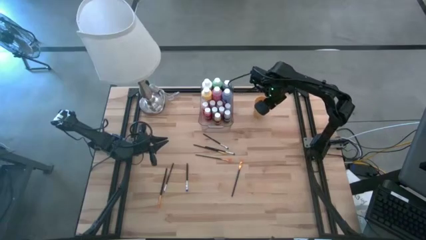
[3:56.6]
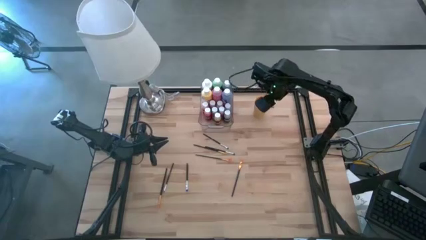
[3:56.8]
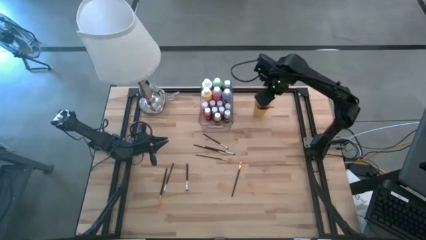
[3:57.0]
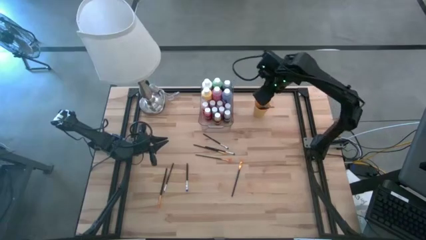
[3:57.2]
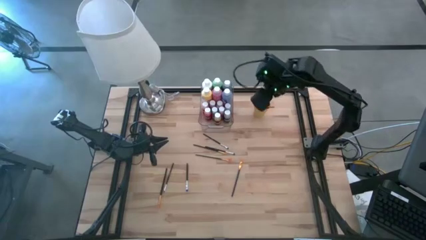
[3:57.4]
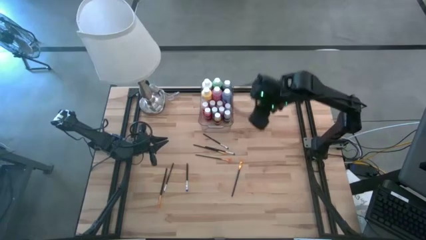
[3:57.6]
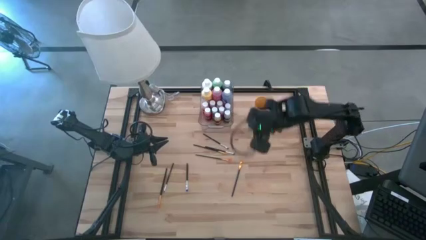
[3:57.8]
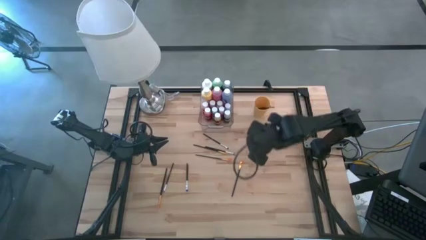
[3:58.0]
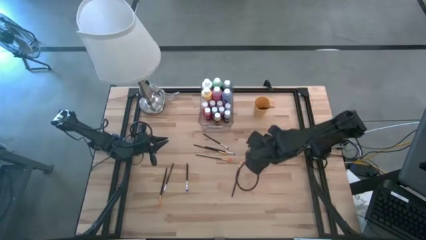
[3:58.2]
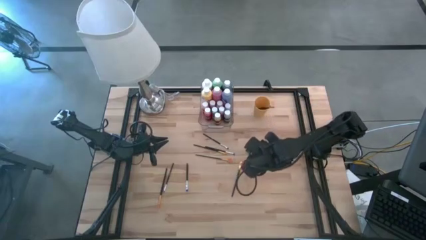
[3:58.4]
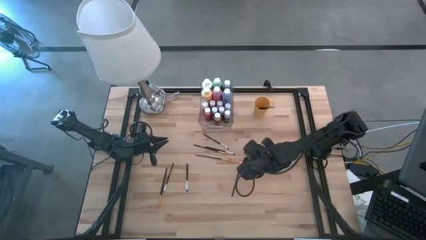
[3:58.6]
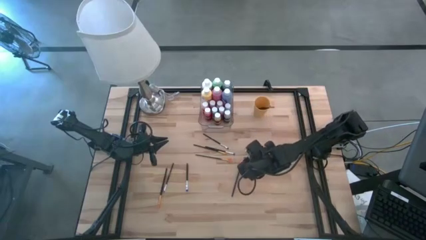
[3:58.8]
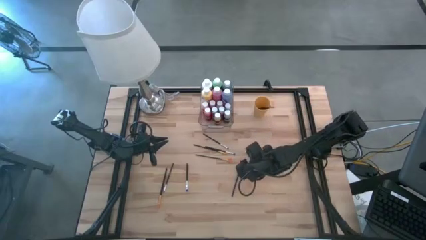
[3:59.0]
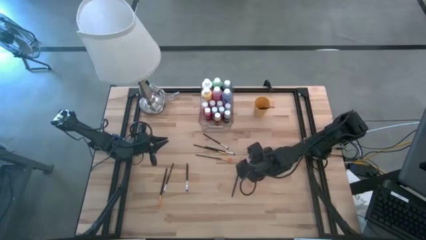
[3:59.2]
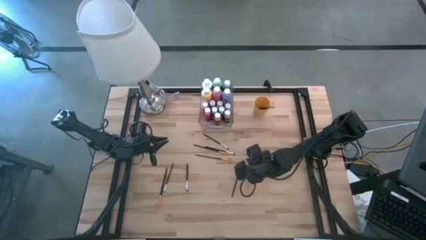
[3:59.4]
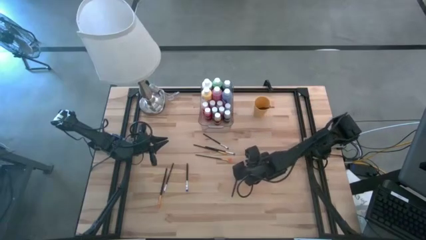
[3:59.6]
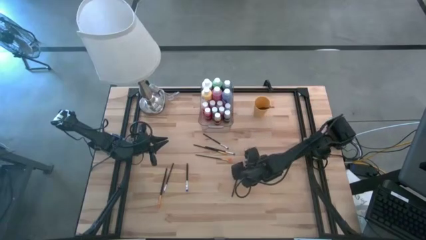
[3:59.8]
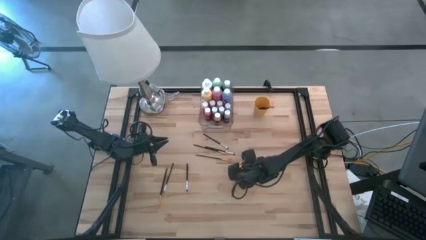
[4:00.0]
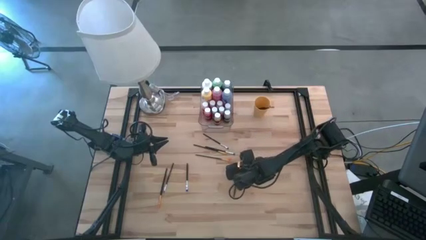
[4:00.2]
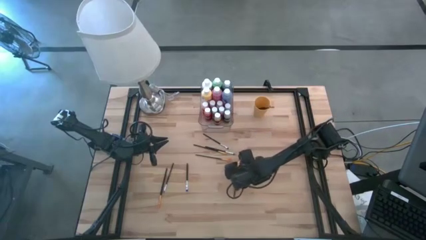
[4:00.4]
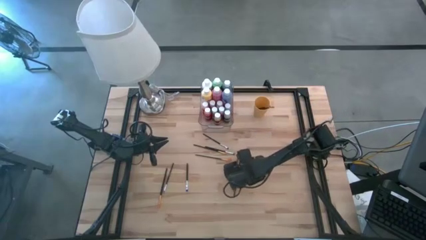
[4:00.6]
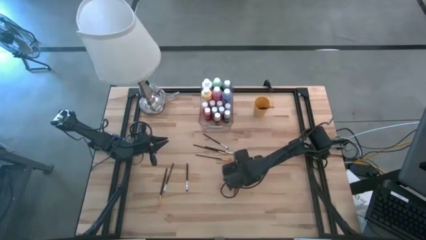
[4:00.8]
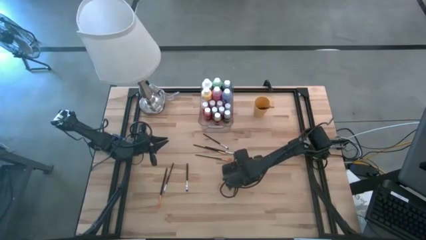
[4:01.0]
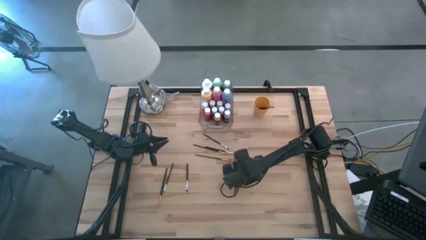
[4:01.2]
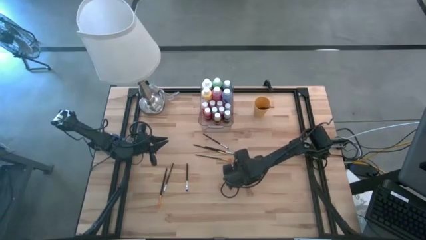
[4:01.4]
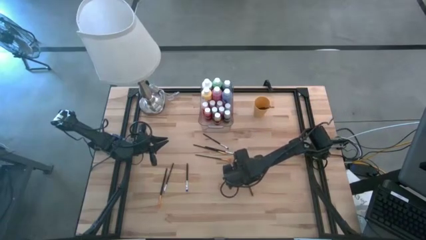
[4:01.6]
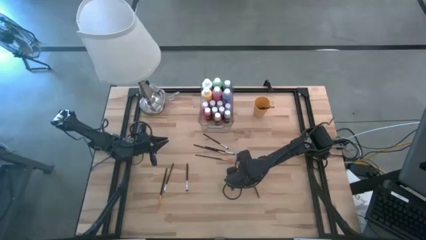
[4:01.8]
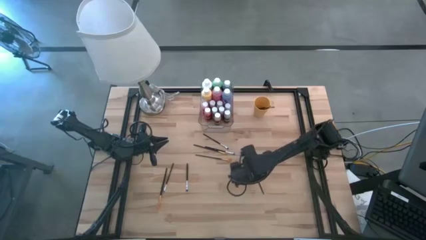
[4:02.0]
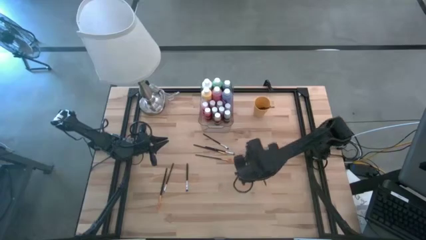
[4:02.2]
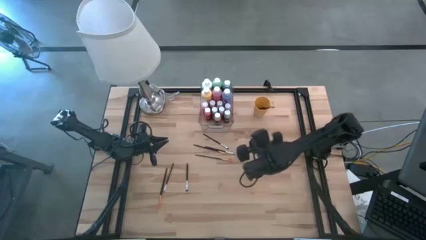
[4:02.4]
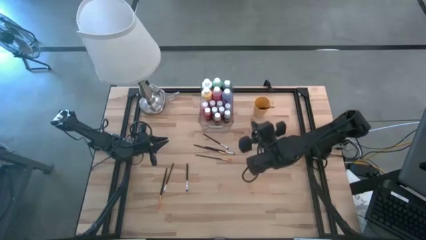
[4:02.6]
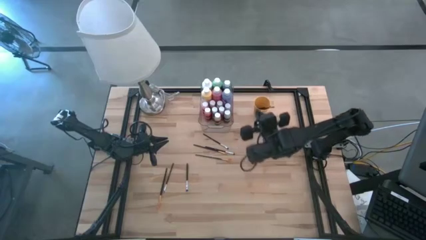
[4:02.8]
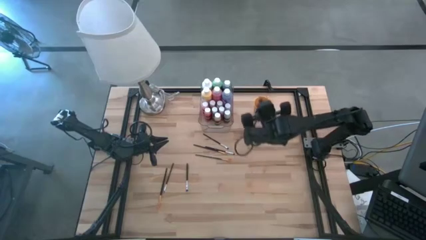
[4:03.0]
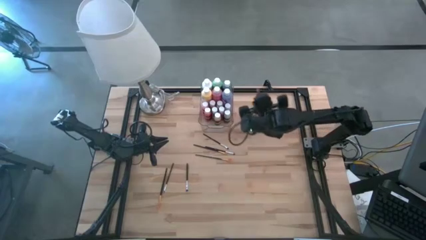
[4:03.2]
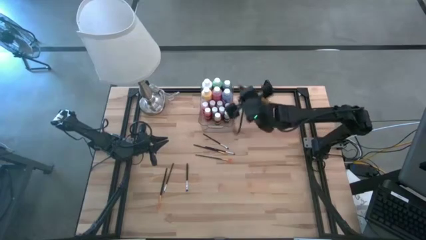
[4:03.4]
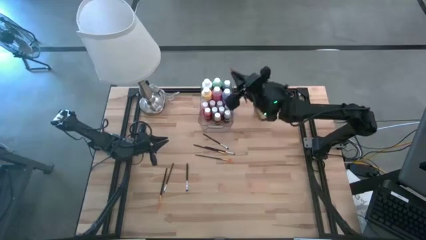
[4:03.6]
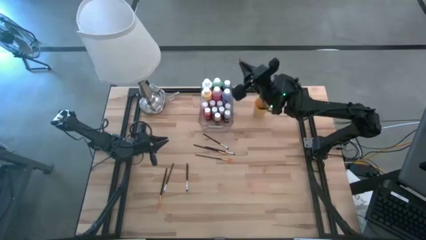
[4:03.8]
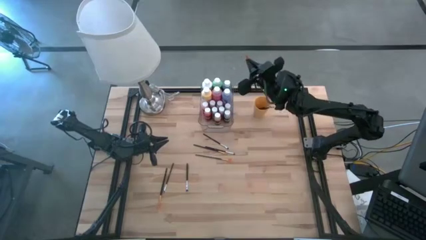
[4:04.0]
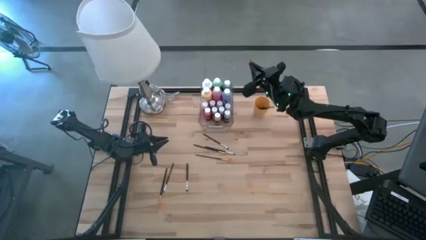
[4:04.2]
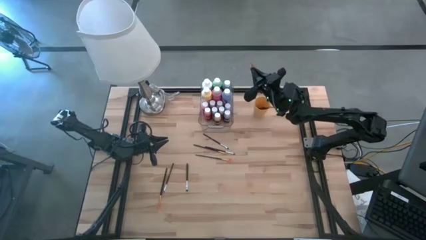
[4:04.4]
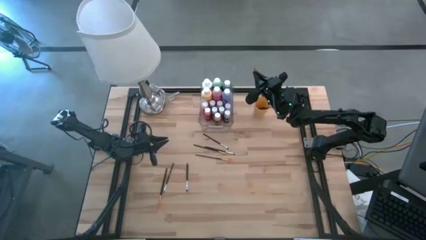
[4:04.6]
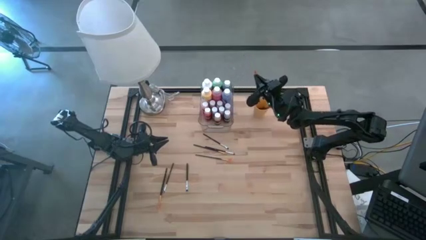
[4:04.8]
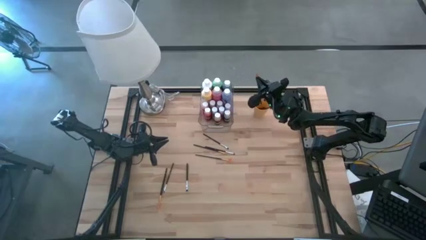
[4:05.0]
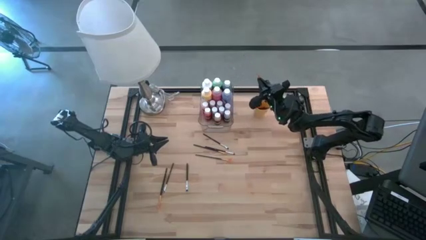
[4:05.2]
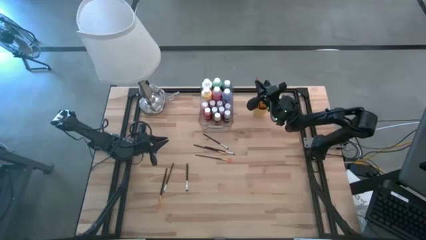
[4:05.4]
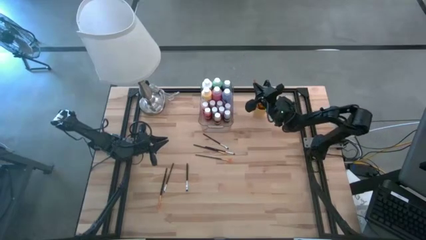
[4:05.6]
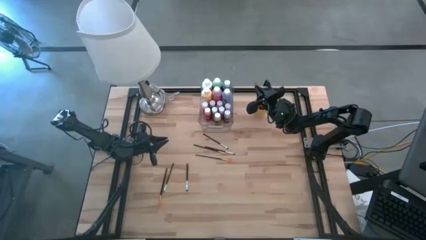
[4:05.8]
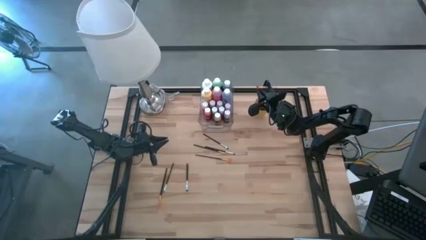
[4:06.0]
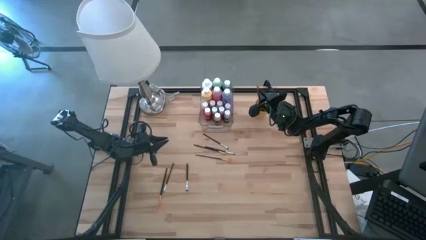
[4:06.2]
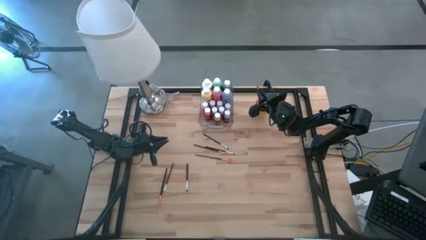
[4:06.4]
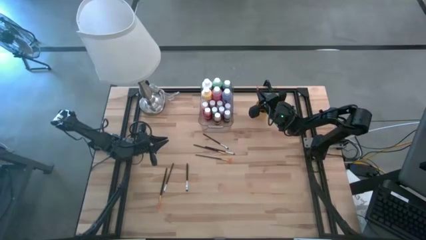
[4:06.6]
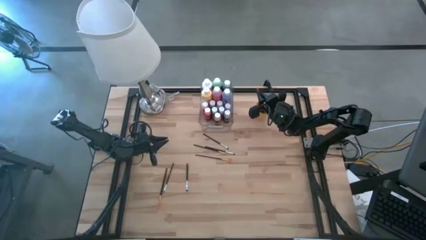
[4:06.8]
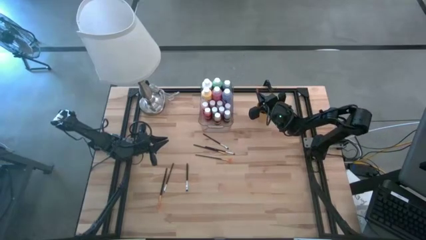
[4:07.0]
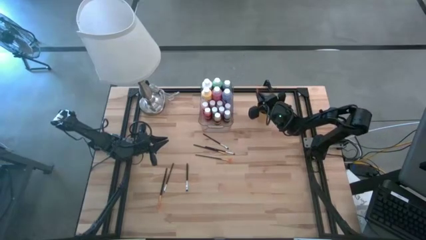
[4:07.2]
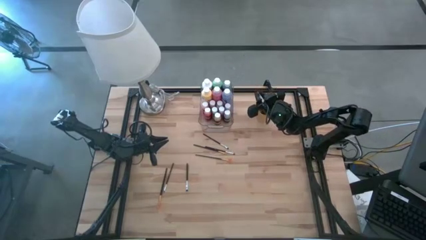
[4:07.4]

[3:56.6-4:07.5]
Task: Pick & Place Paint Supplies
Put the gold paint brush into the cup

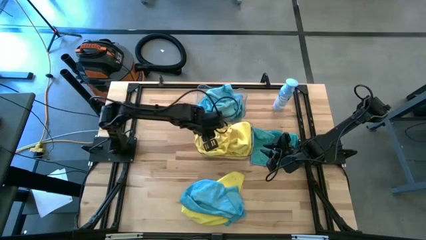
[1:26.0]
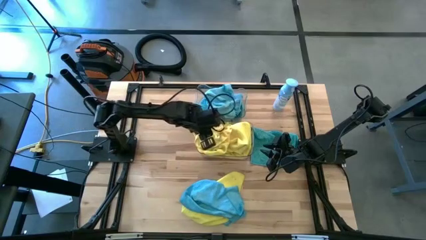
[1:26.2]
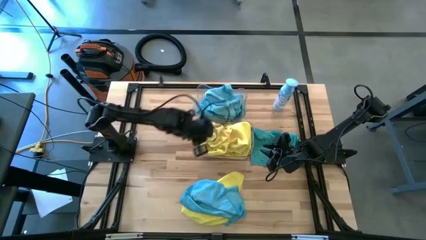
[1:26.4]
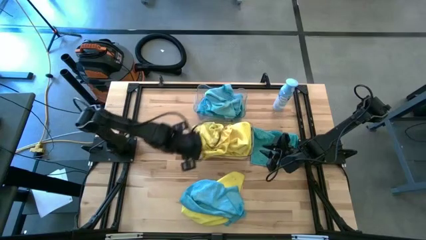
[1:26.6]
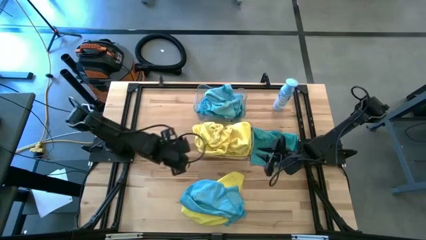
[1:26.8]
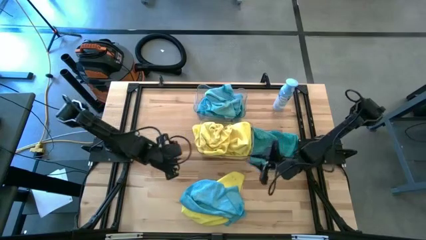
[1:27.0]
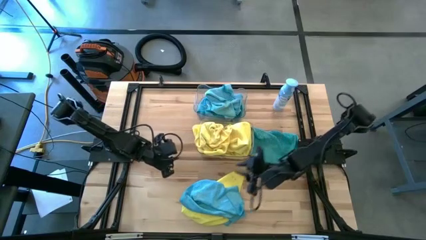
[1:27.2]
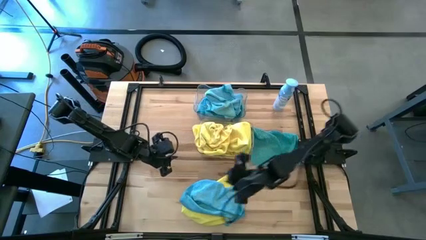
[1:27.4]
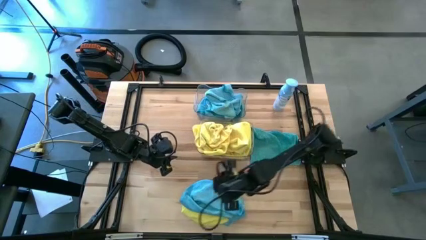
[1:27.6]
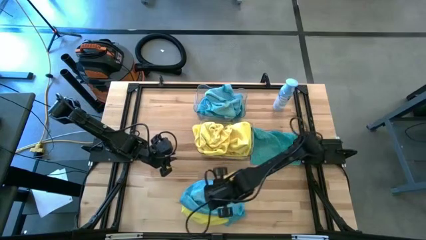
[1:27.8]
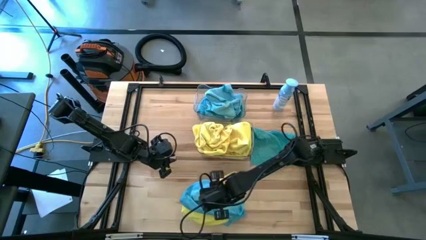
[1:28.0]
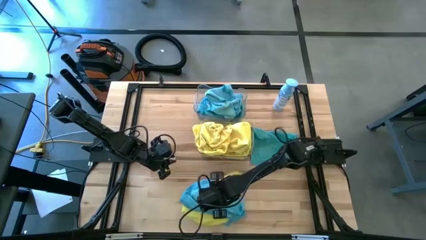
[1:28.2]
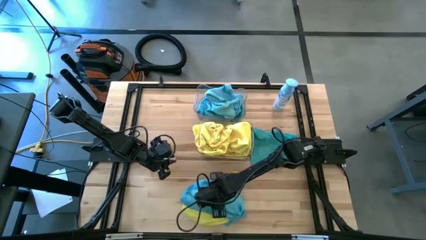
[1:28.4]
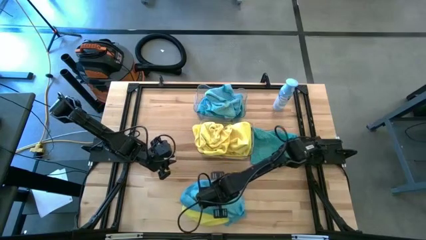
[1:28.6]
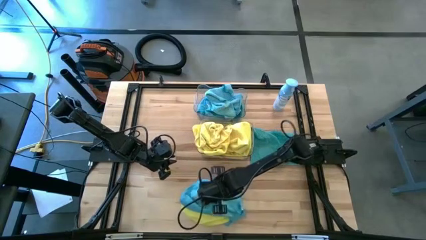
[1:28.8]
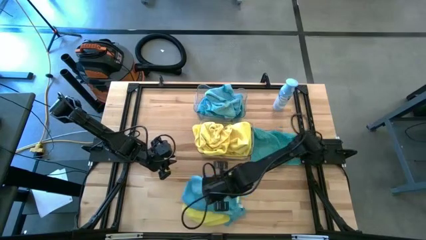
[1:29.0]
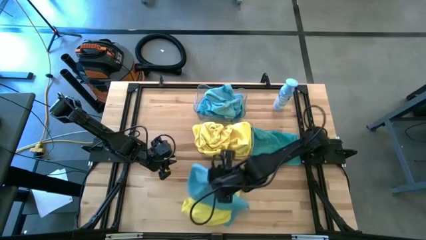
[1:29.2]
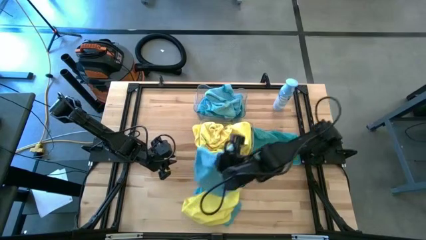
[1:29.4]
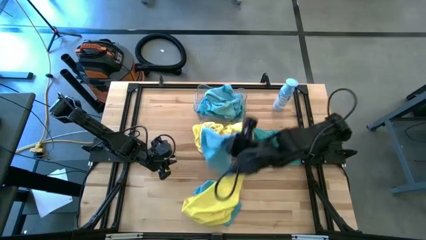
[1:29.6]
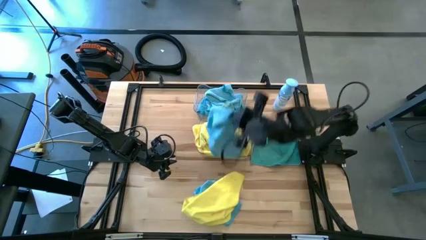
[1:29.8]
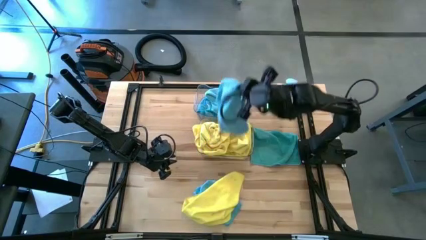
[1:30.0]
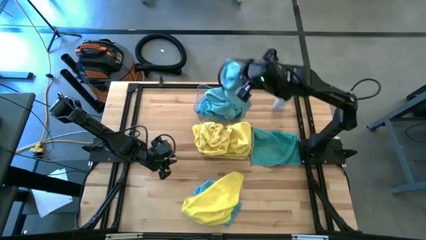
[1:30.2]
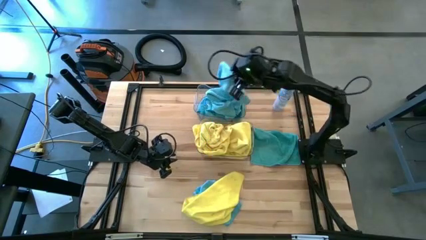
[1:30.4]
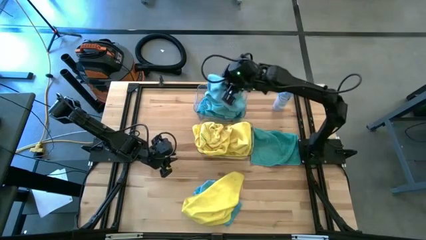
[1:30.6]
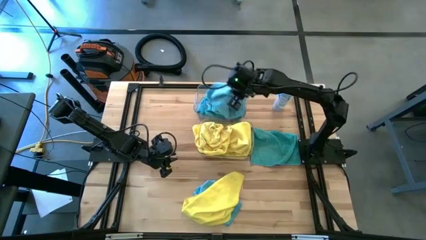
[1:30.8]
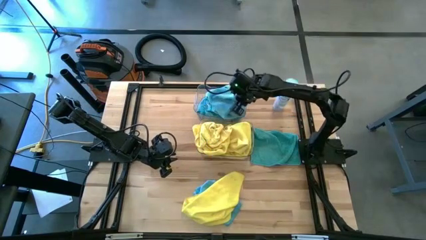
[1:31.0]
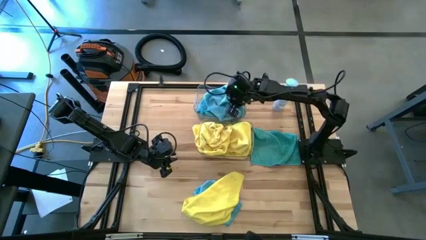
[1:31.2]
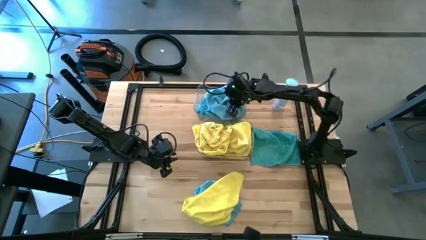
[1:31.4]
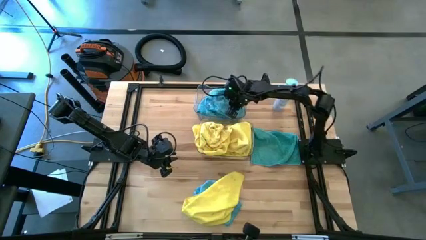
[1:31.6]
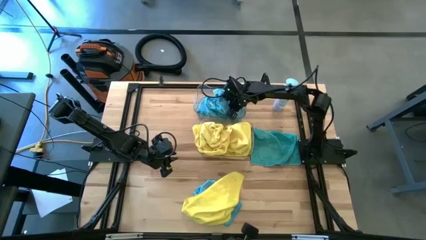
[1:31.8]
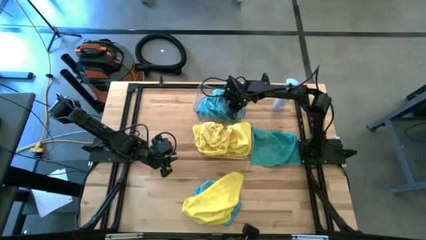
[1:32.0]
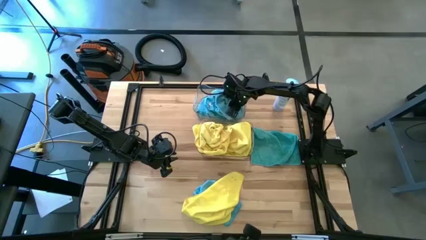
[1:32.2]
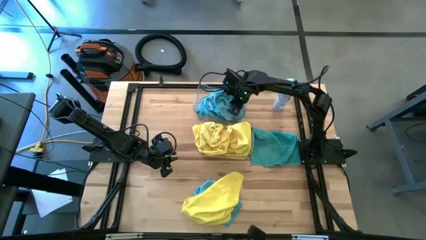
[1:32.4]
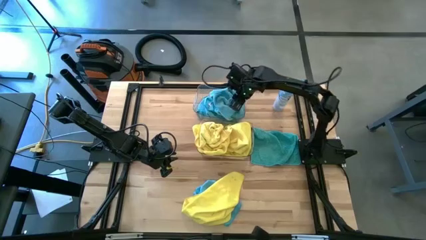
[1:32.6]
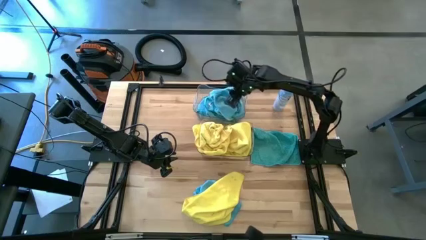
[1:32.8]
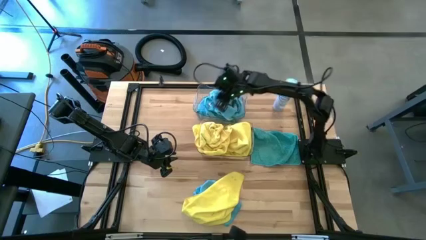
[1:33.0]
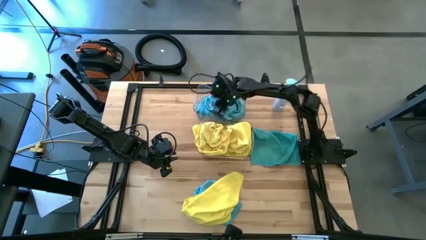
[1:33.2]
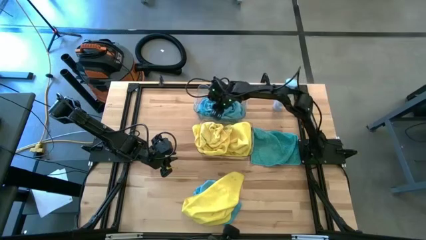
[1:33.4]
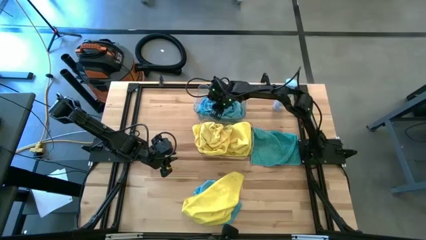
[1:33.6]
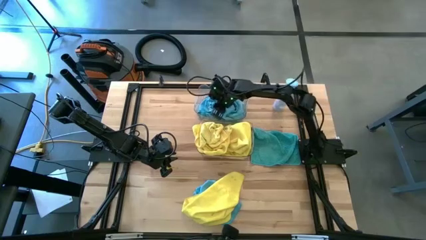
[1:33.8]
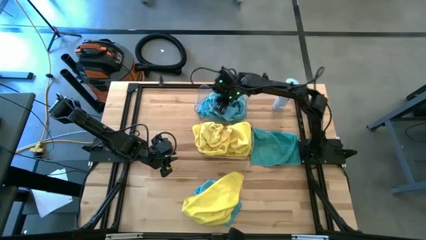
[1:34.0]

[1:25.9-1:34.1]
Task: Sort microfiber towel by color & place in baskets
Put the blue towel into the top transparent bin
